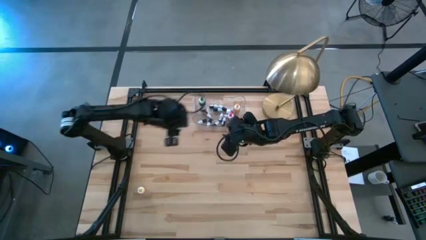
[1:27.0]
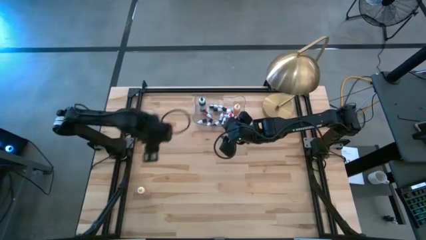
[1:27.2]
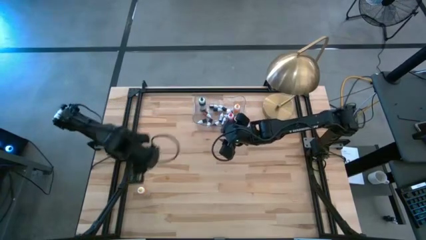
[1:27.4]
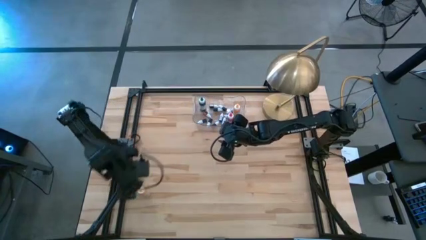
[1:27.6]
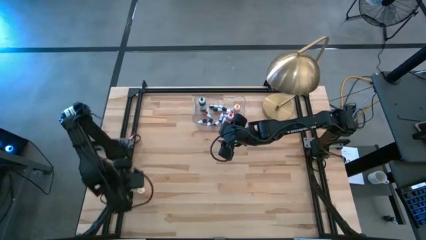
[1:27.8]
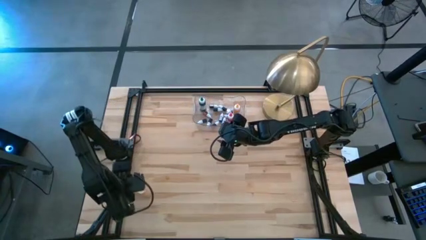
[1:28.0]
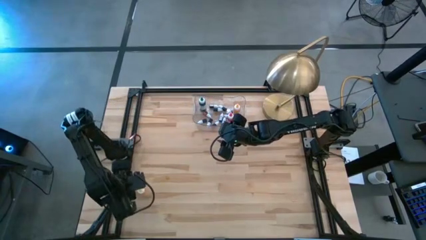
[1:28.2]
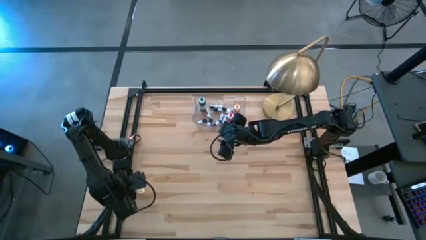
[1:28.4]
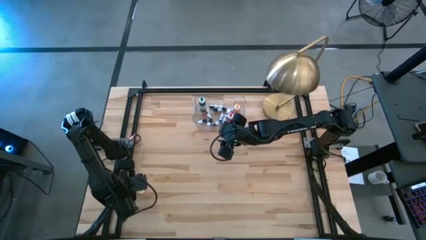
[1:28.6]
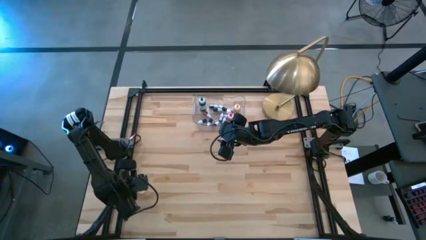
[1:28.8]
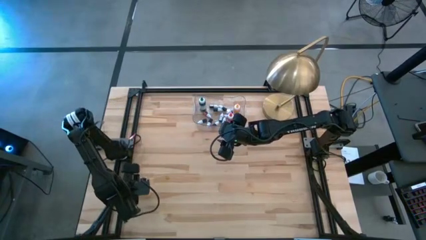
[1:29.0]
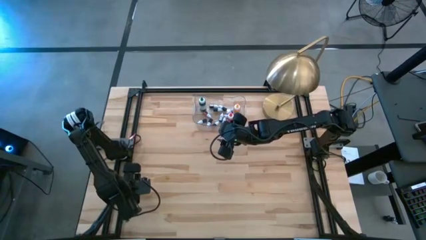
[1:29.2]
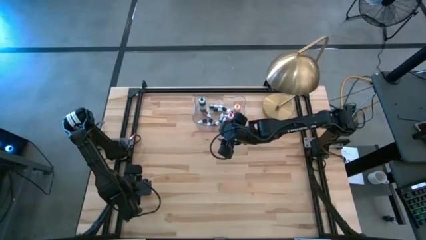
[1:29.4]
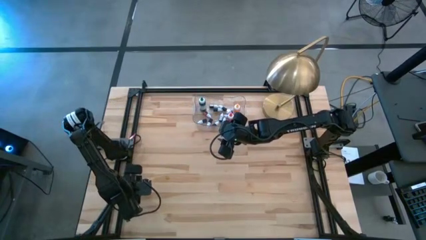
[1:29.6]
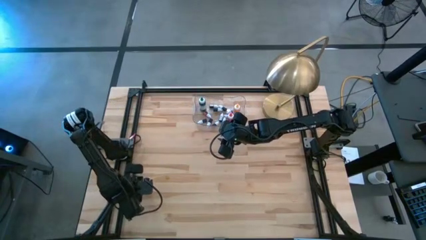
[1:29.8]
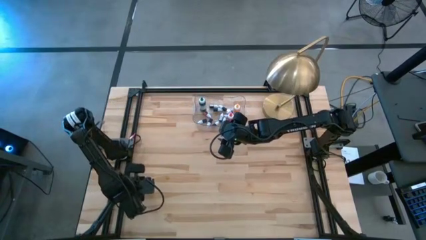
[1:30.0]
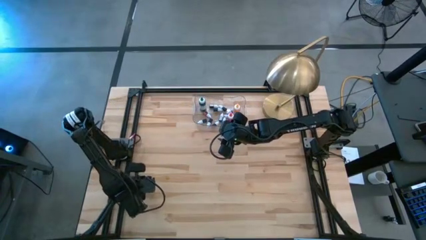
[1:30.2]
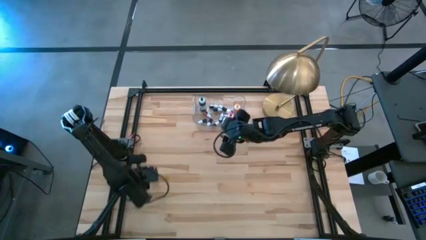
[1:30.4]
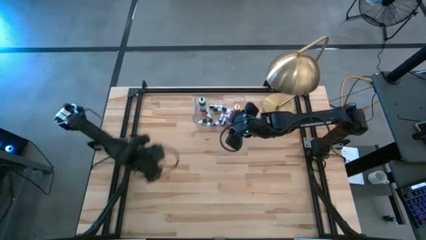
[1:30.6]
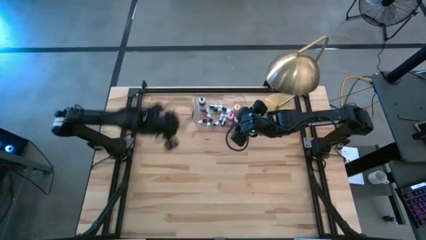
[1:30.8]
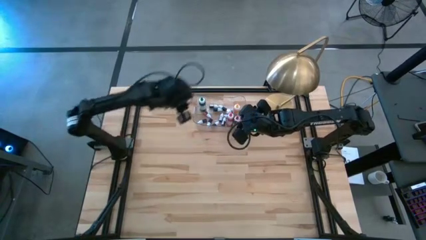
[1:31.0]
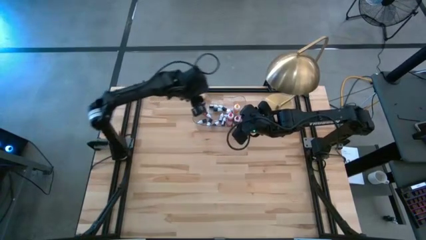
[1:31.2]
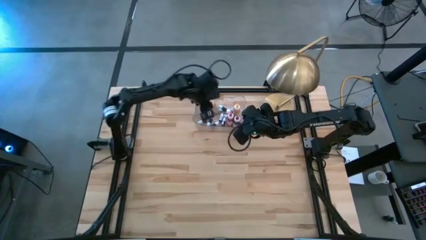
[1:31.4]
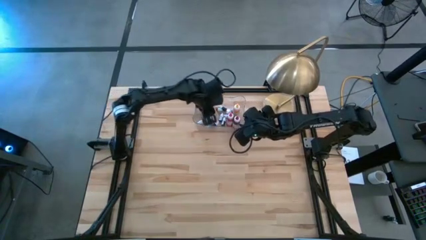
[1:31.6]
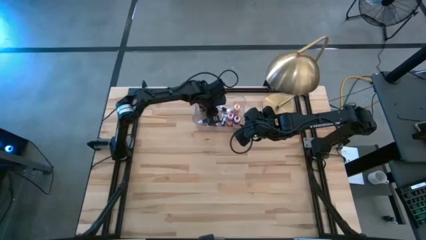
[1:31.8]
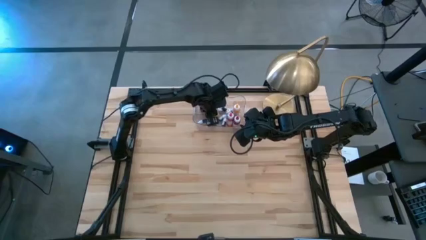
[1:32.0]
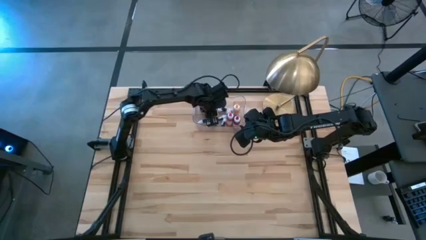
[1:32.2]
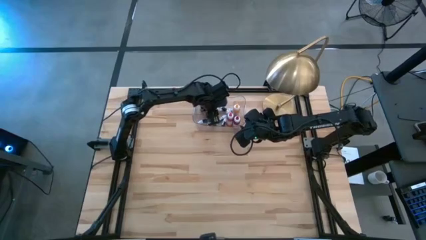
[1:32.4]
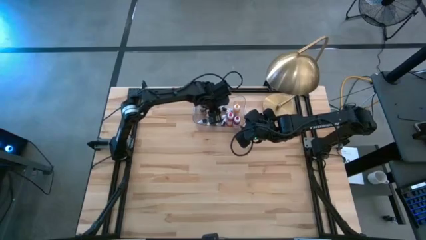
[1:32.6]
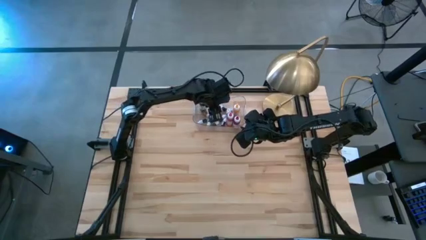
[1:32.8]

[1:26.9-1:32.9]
Task: Pick & Place food coloring
Put the big yellow food coloring bottle into the transparent bin

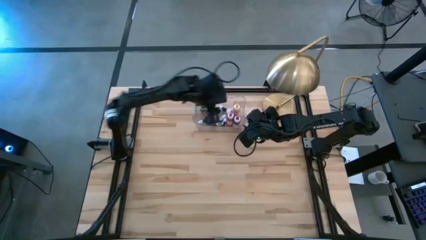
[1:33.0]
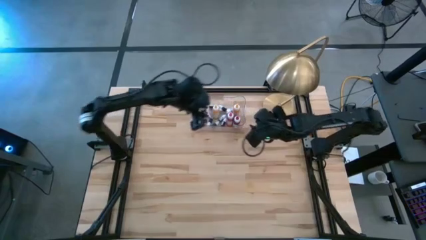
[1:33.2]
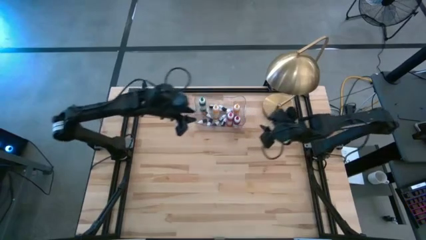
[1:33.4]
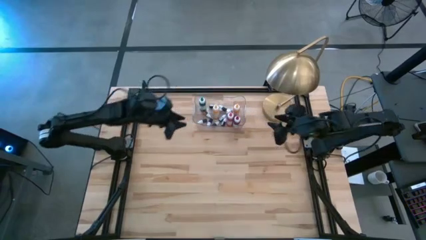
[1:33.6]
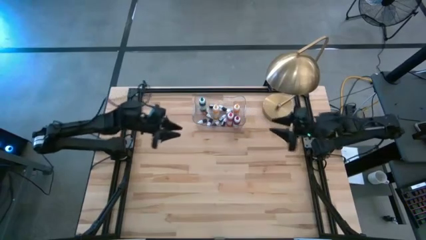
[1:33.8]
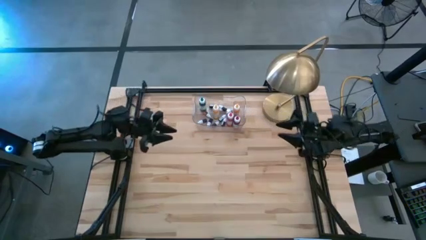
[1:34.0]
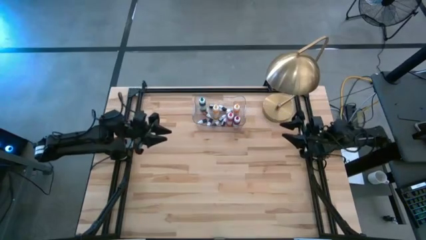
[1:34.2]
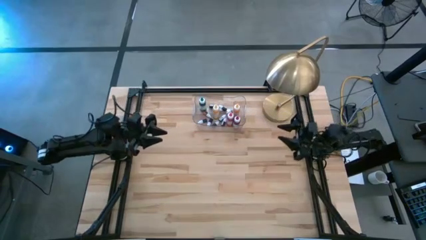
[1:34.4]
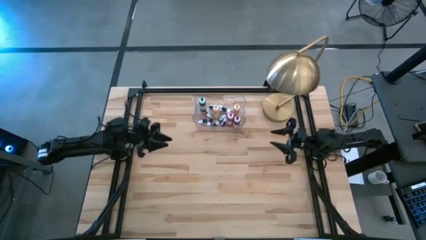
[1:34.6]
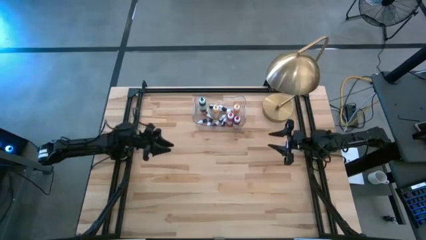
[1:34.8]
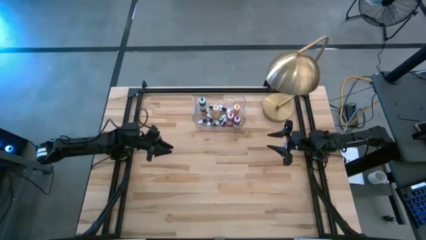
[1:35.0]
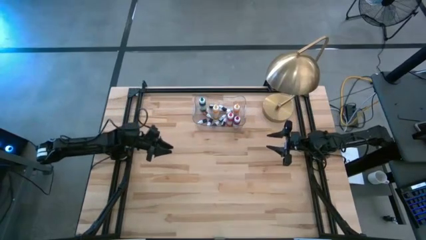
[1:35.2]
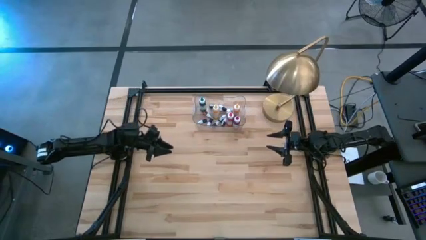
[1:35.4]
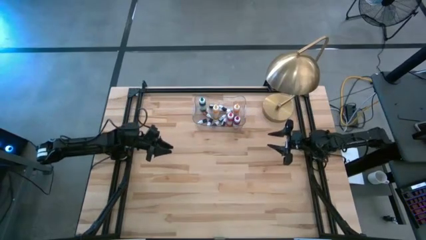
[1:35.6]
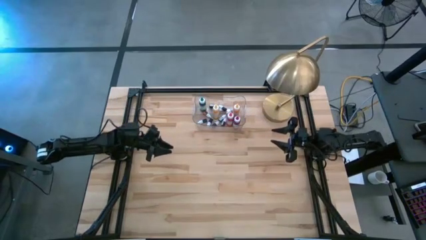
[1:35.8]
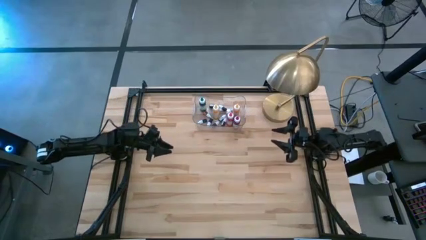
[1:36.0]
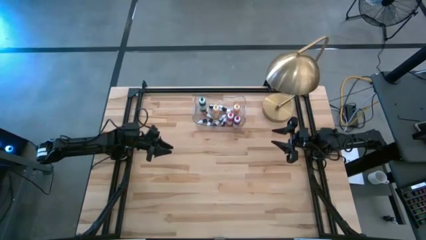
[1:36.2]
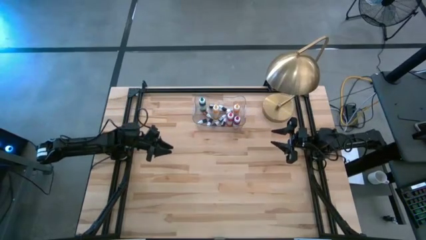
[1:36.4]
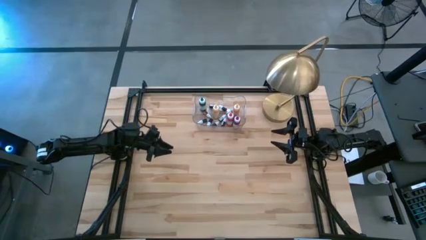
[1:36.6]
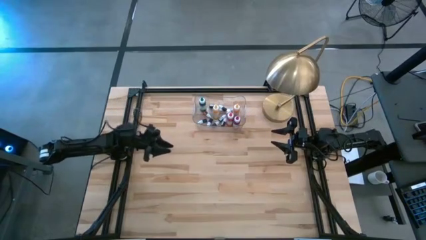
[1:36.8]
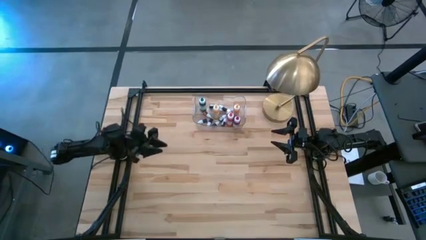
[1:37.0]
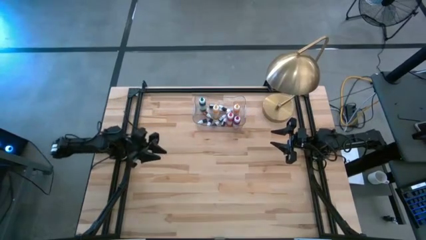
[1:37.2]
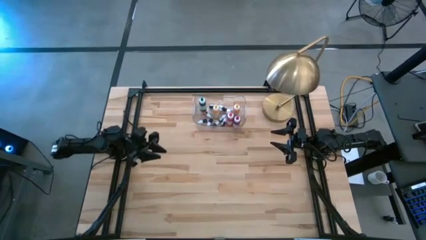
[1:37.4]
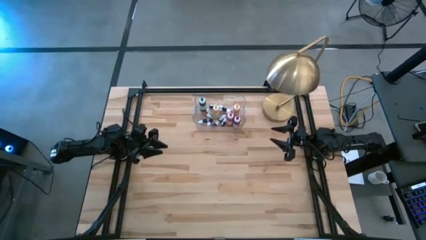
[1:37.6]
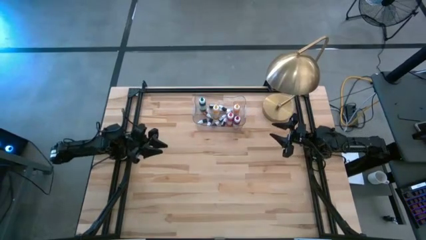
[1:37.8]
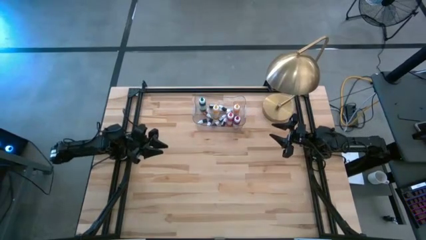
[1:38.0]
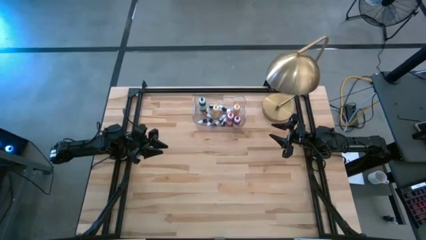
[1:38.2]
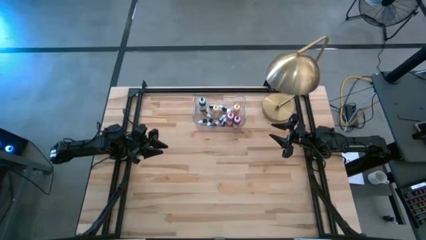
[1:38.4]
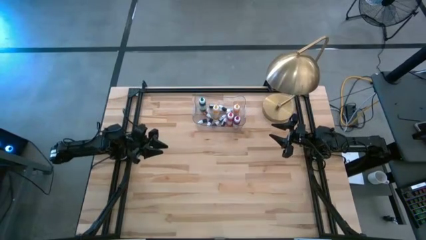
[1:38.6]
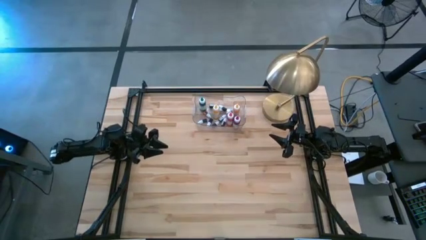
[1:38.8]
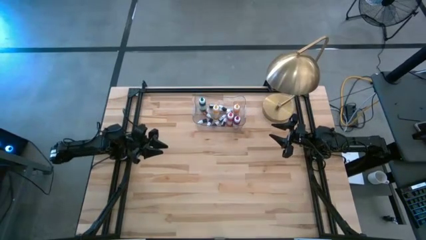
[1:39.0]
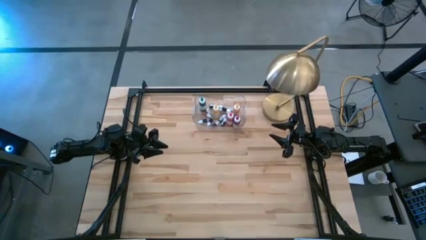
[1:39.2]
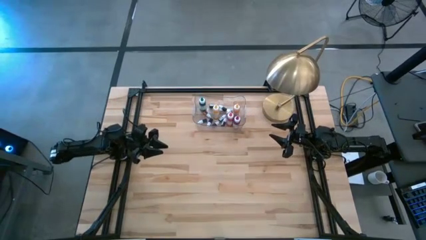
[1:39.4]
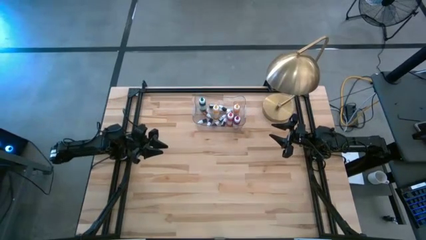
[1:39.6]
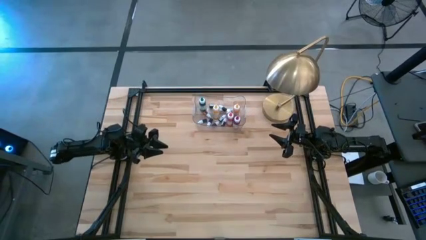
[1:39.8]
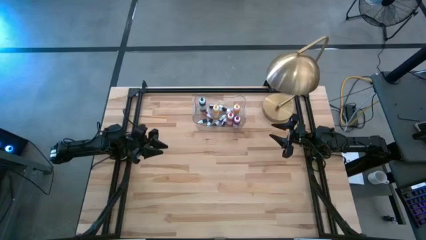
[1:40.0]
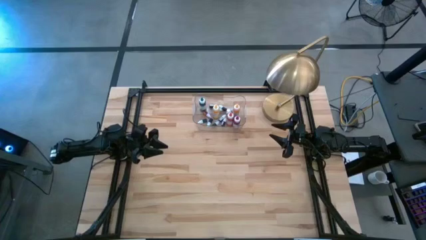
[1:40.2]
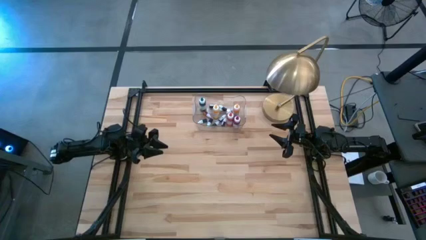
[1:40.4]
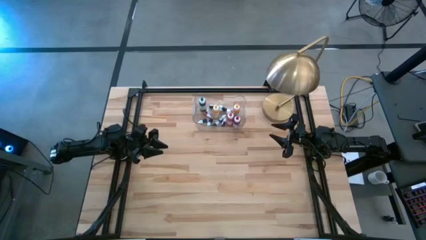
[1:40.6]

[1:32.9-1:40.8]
Return to Home Position

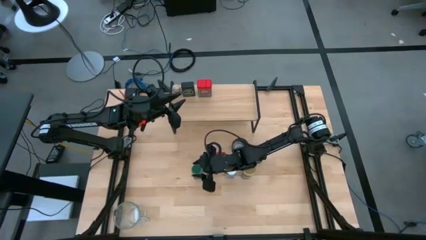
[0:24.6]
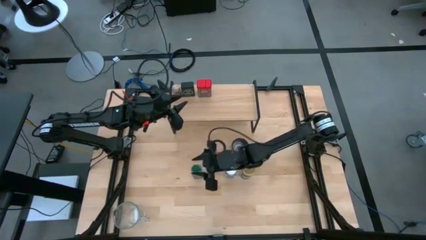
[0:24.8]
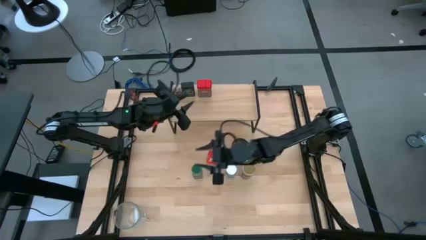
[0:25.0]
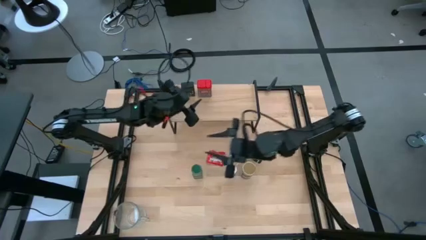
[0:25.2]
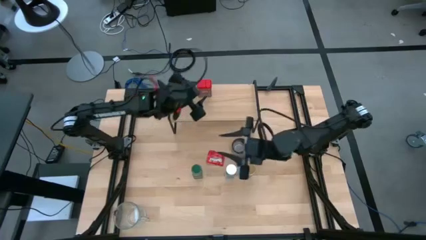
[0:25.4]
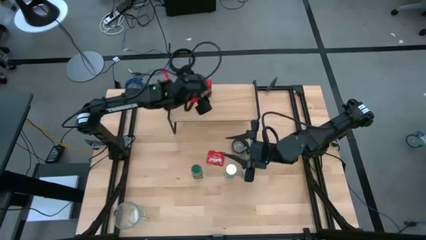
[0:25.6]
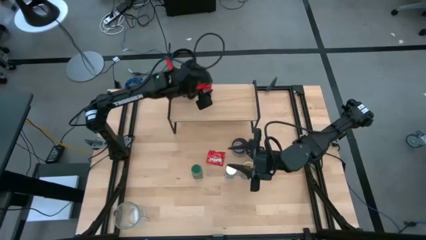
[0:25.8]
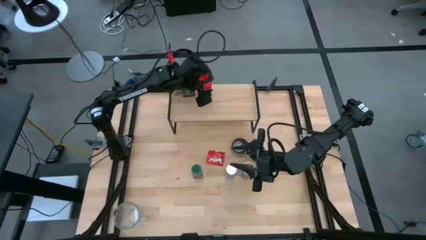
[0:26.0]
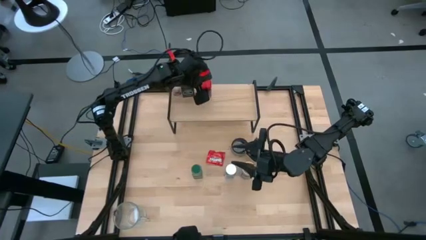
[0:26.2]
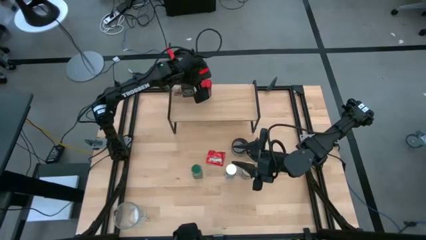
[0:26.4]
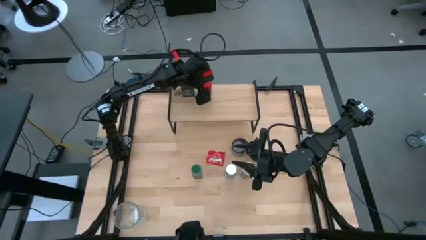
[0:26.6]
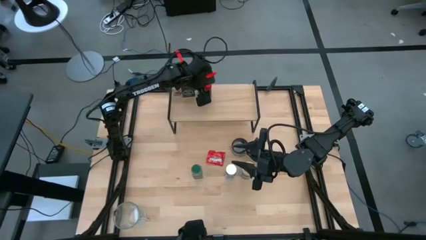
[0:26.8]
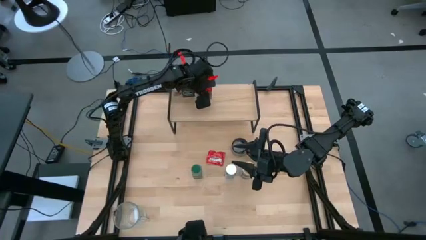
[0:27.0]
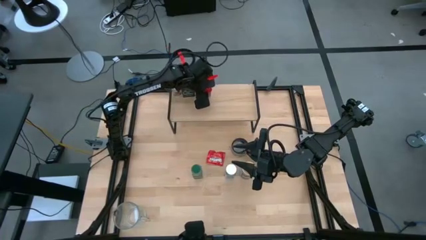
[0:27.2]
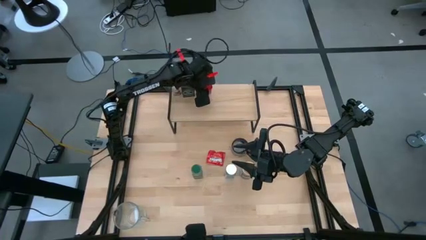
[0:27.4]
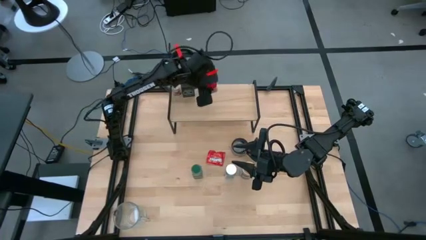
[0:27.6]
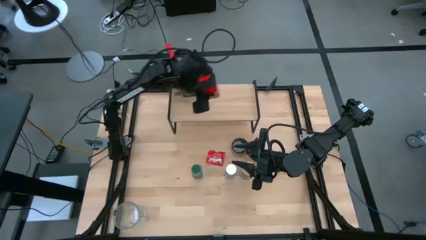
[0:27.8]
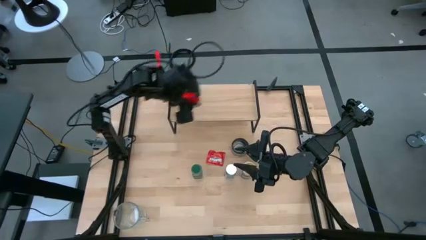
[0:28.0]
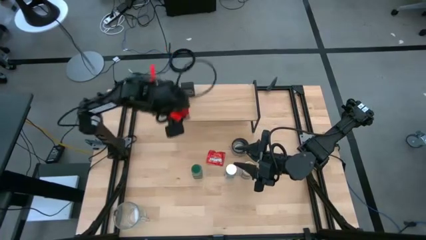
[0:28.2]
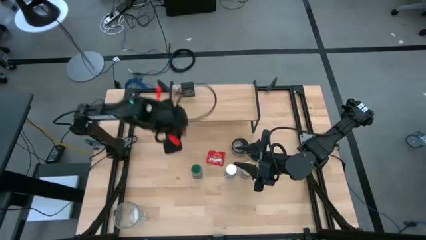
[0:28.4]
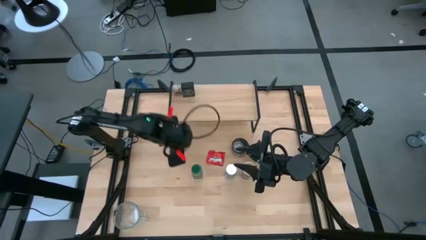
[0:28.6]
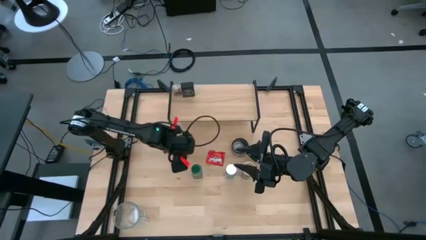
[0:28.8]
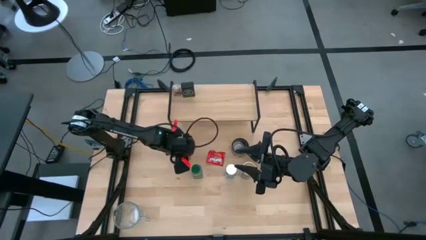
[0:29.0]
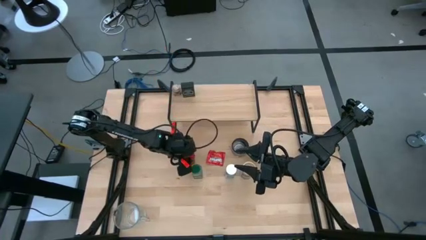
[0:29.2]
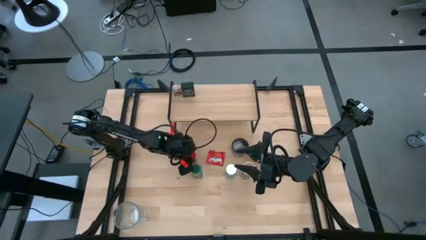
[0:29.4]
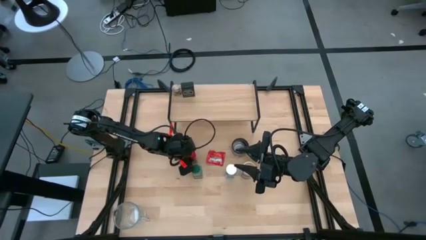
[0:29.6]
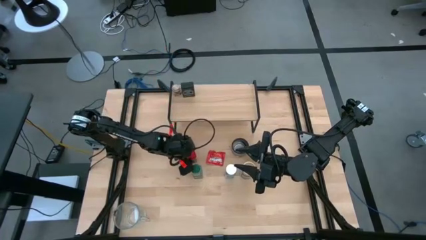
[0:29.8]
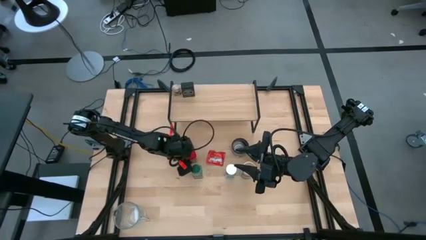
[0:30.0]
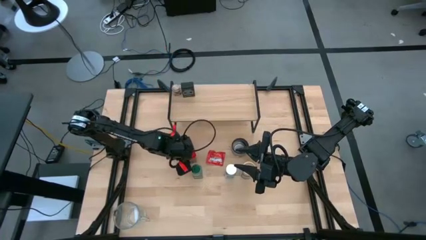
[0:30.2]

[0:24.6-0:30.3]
Task: Shelf spices
Remove the red seasoning can from the shelf
